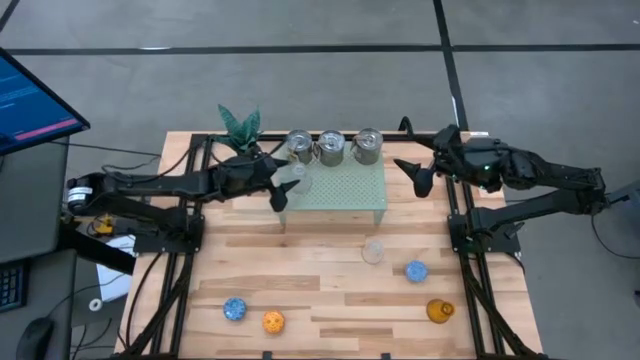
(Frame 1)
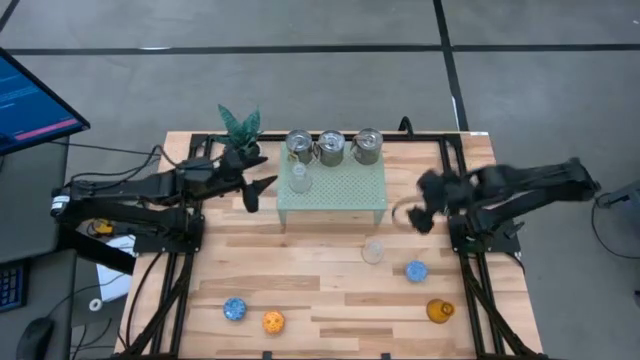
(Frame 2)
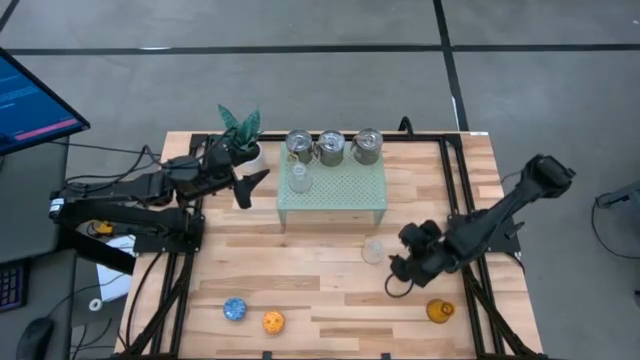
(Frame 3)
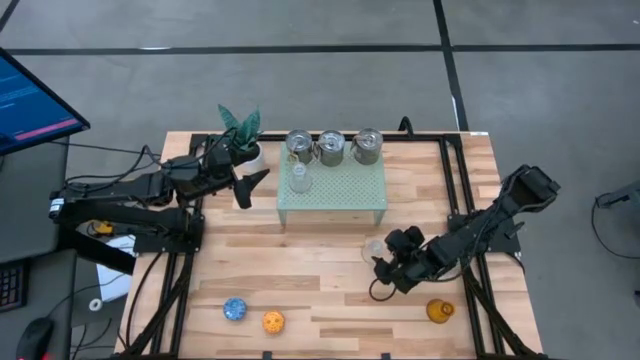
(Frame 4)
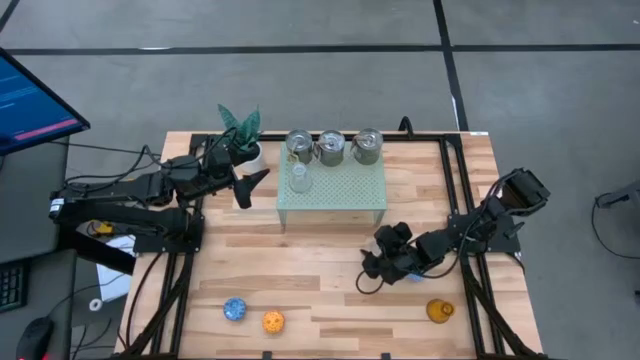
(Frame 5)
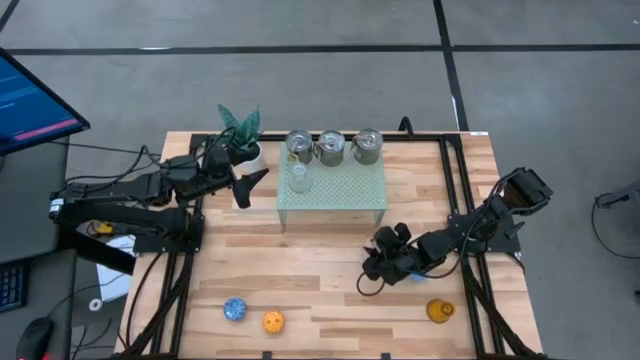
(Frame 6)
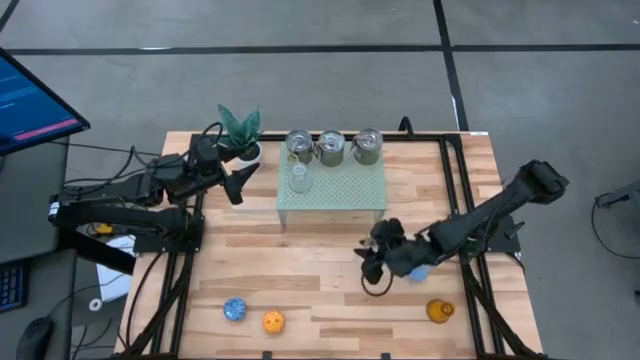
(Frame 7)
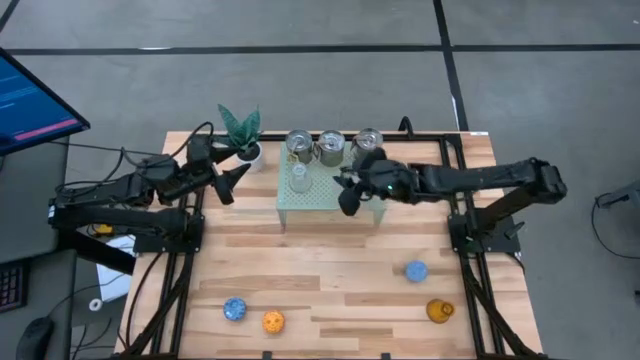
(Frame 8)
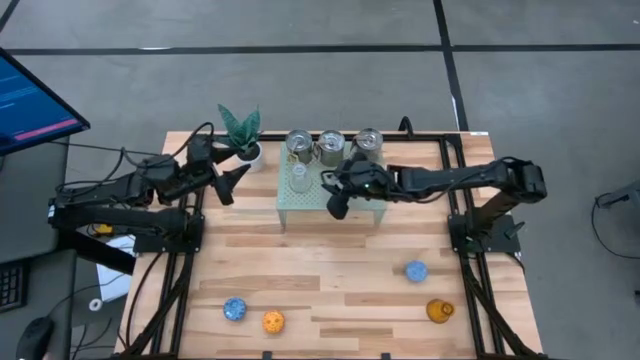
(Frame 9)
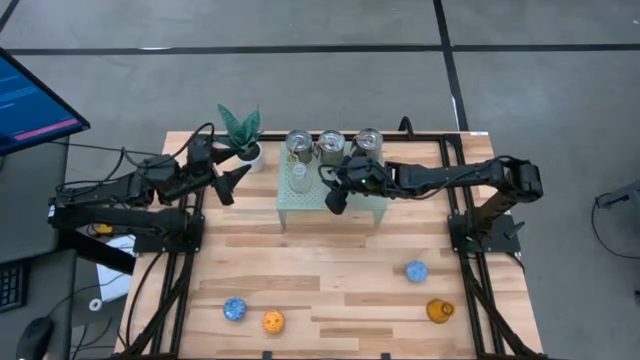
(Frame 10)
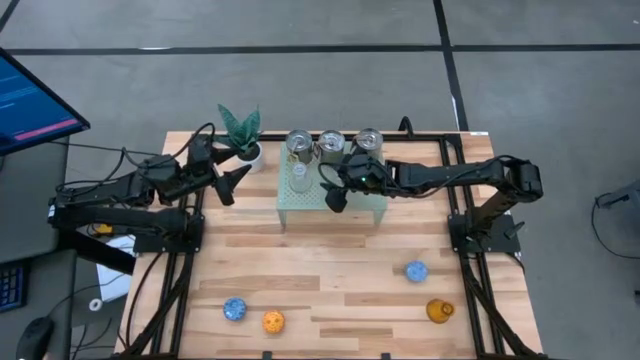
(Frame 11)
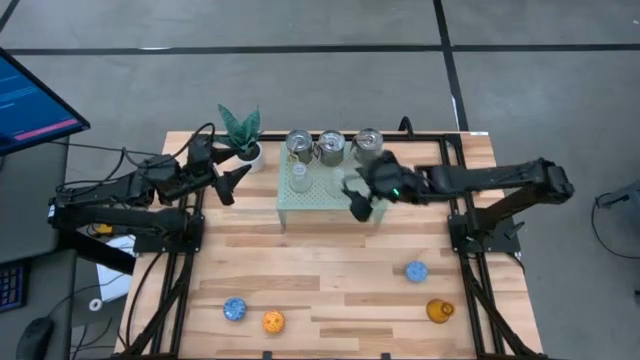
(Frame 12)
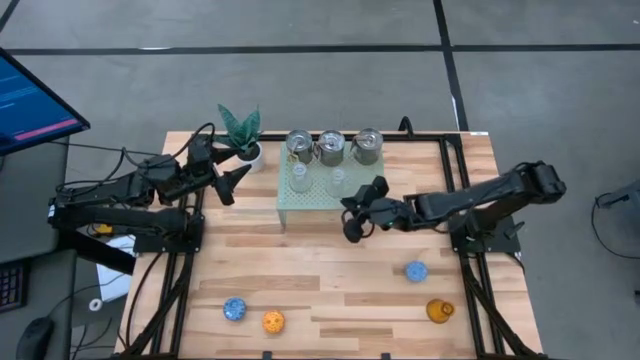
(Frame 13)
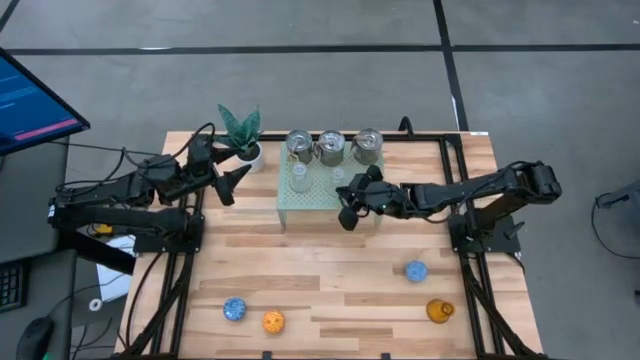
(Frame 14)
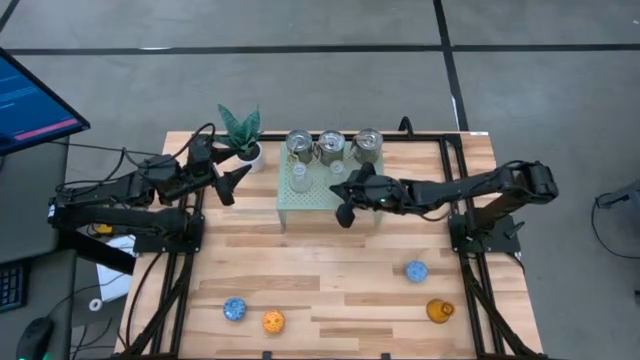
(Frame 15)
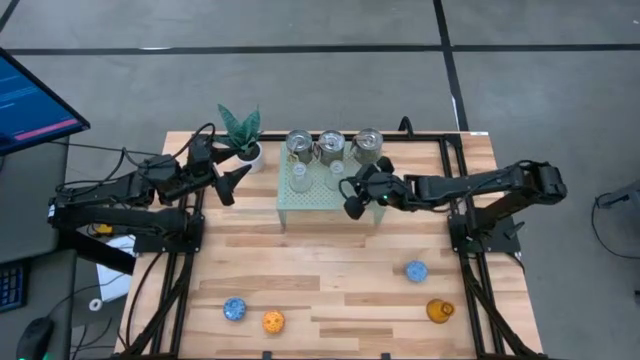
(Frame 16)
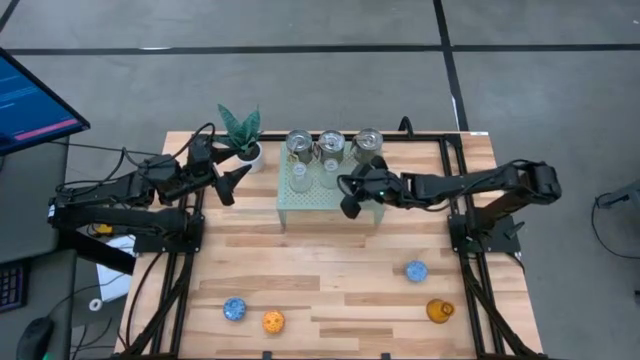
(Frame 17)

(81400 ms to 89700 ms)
Task: Pick & Place candle stick holders
Put the transparent glass candlestick on the shelf

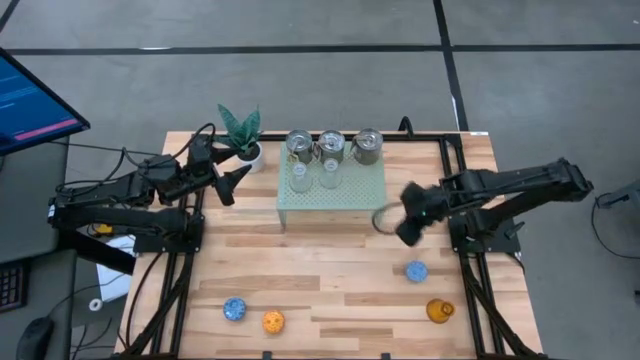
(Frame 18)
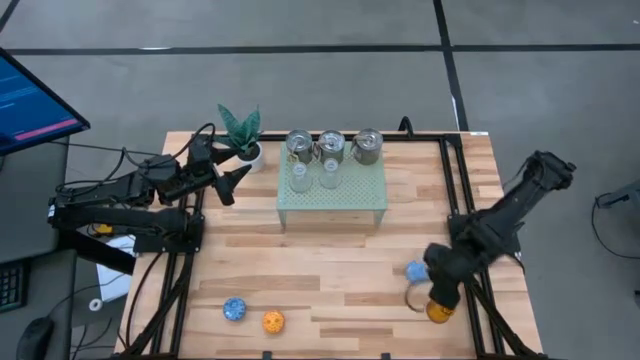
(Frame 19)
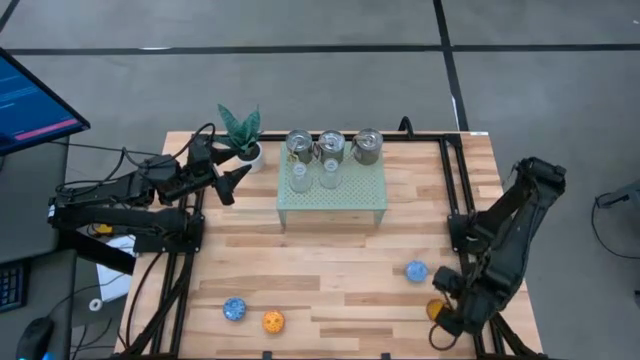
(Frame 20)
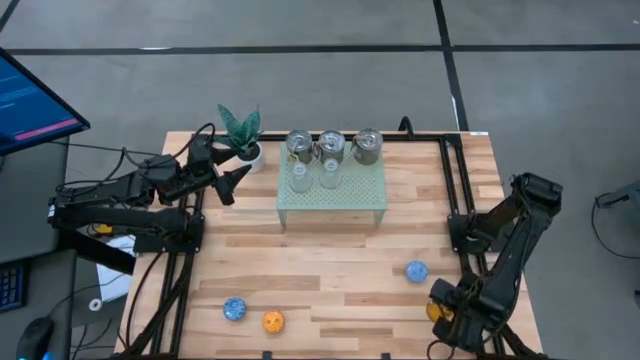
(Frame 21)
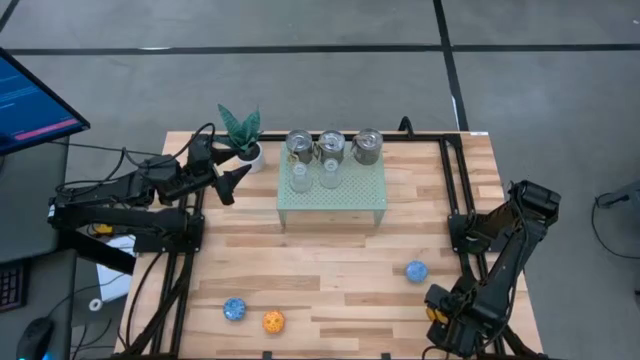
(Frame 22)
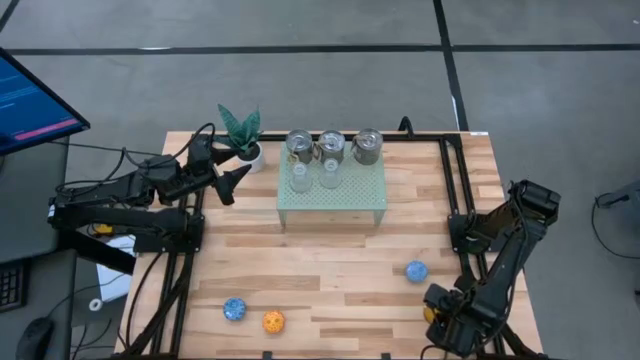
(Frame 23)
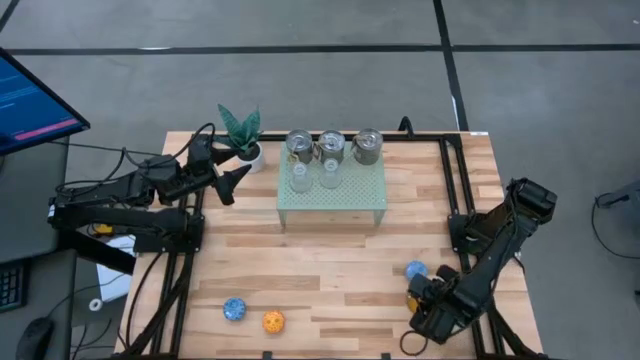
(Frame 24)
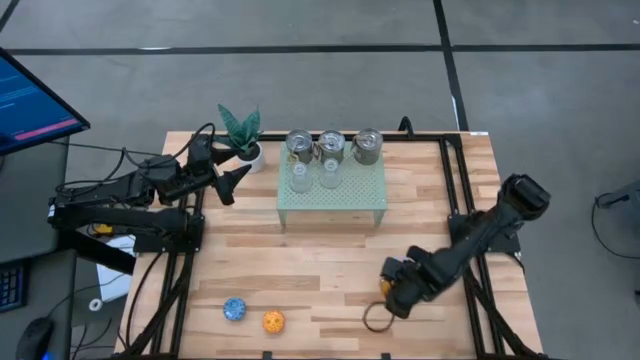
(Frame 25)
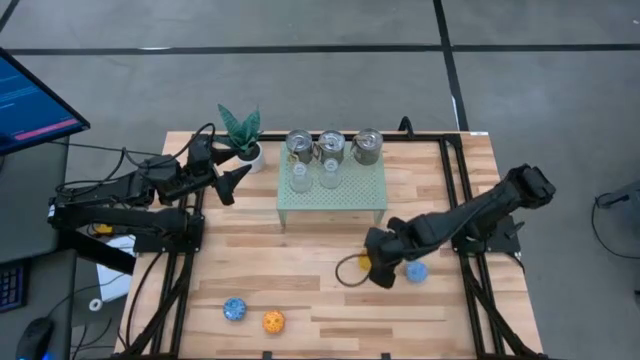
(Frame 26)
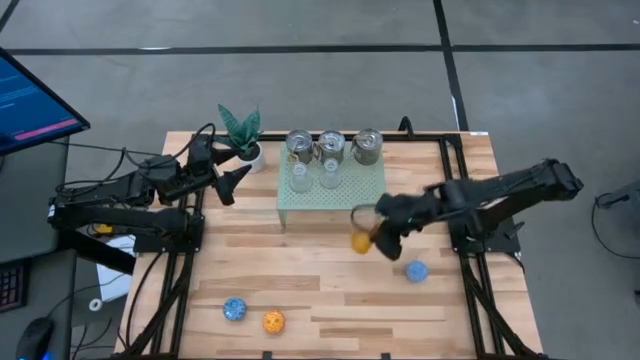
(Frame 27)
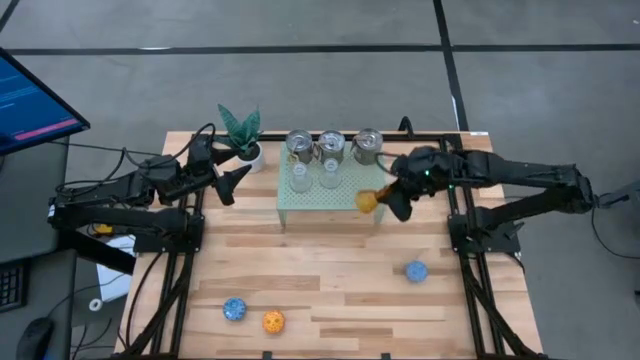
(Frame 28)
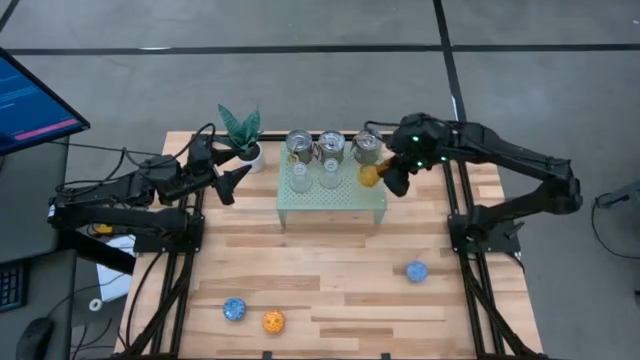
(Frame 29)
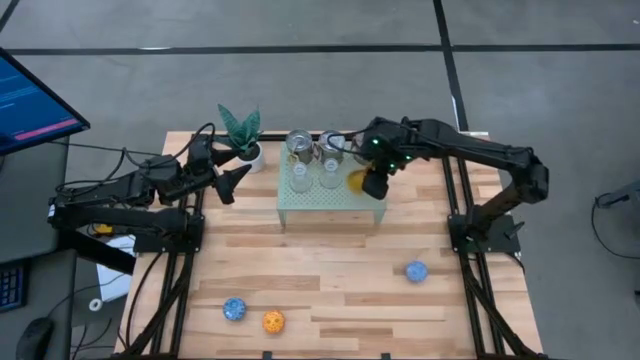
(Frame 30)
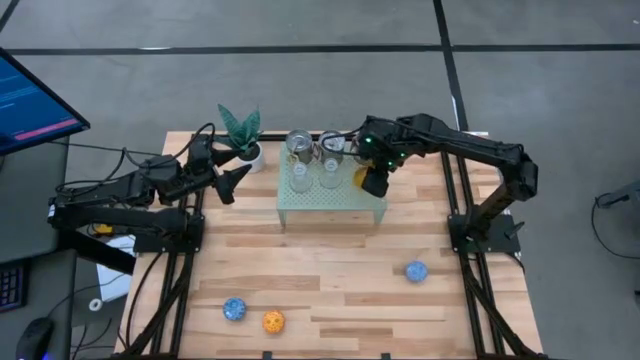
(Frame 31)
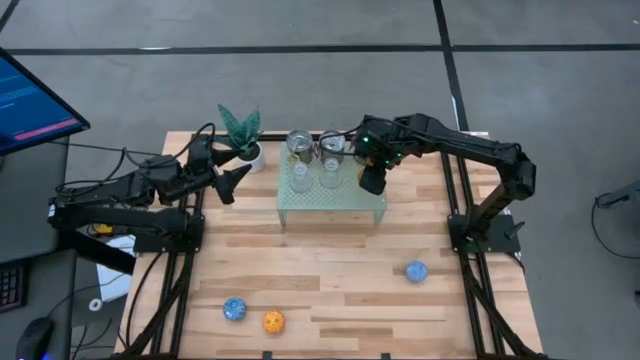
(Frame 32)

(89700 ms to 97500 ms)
Put the brown glass candlestick on the shelf

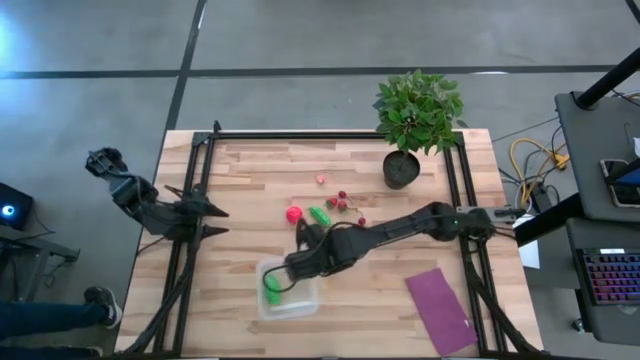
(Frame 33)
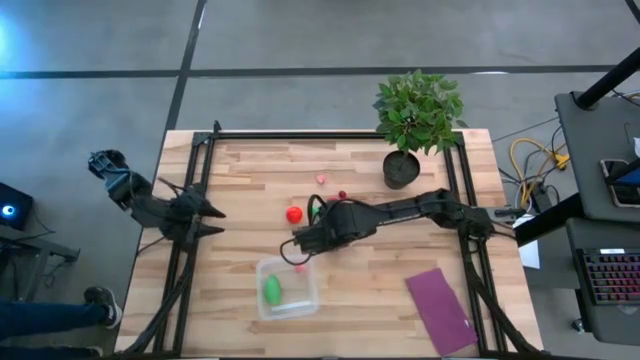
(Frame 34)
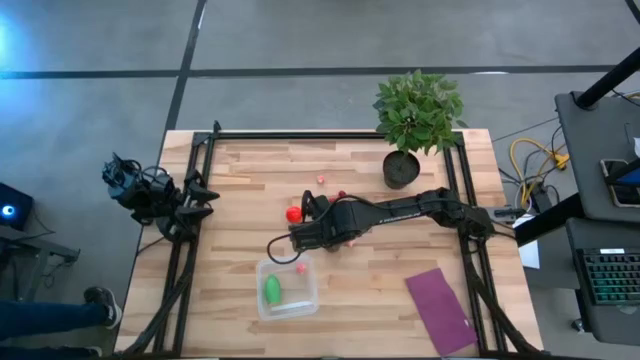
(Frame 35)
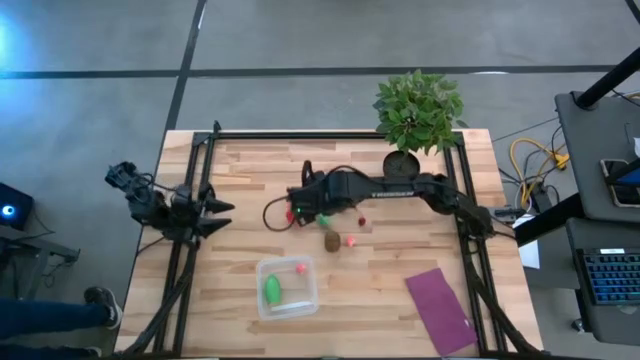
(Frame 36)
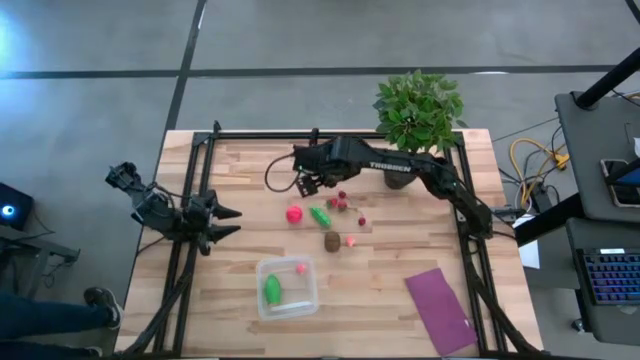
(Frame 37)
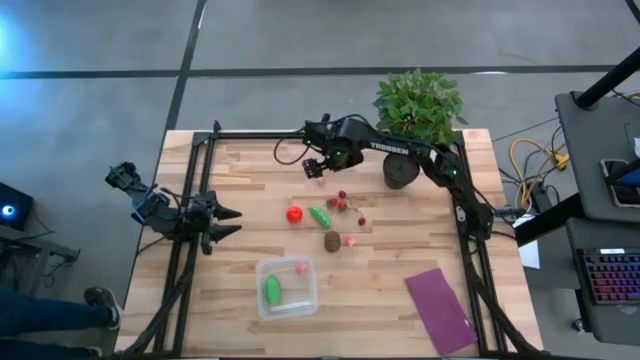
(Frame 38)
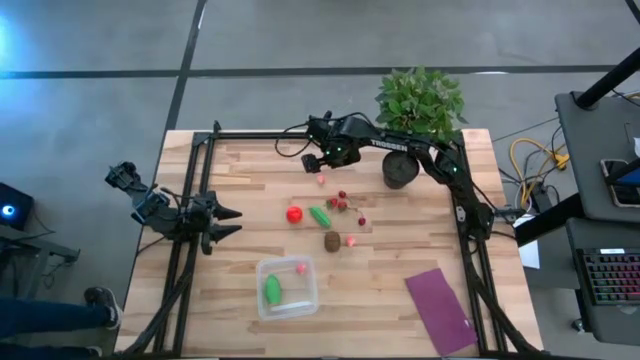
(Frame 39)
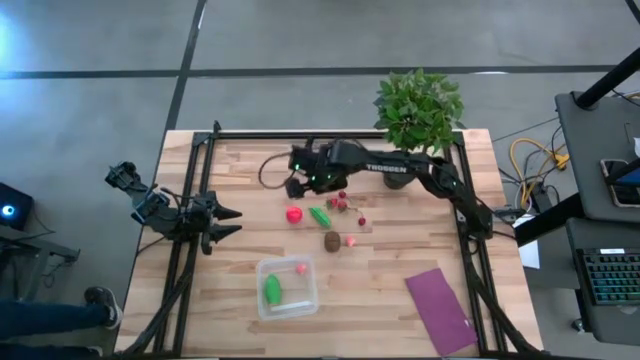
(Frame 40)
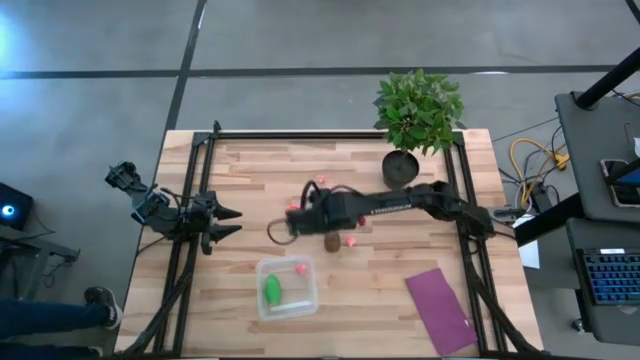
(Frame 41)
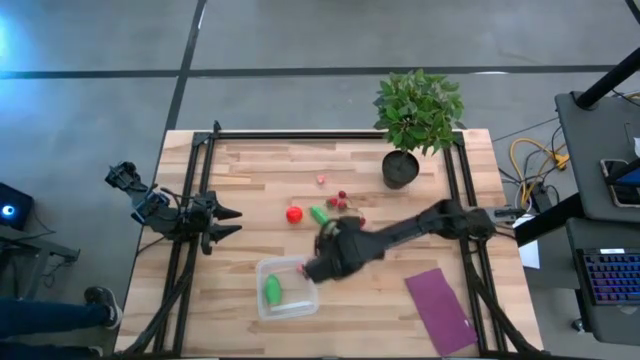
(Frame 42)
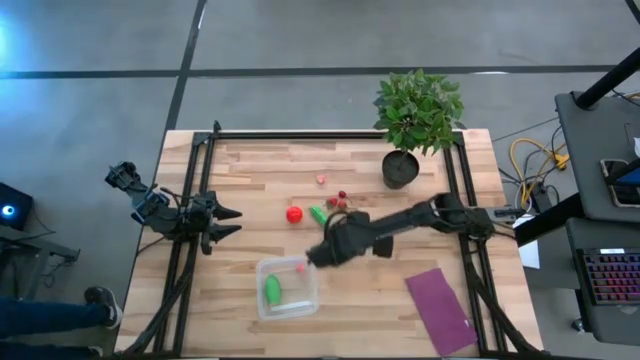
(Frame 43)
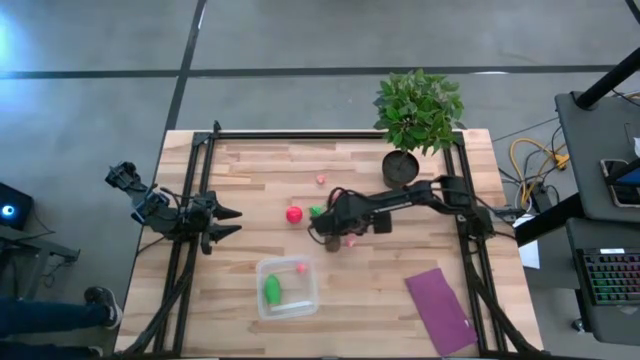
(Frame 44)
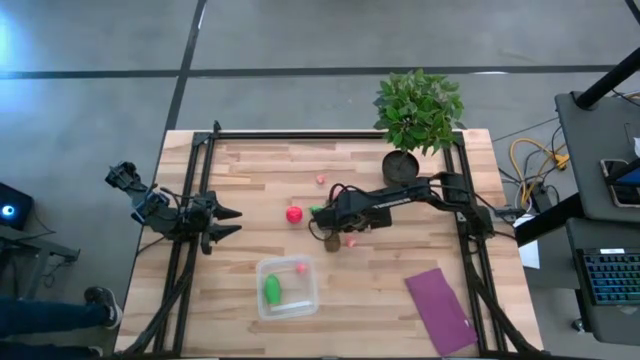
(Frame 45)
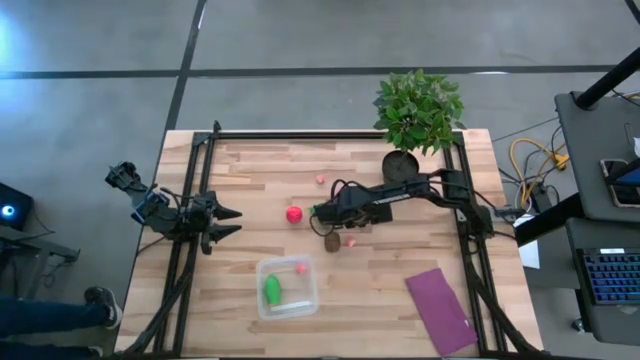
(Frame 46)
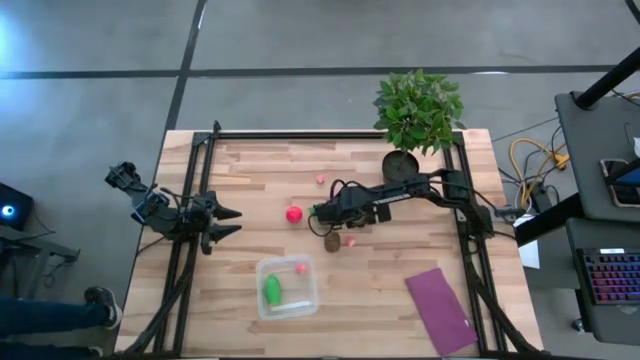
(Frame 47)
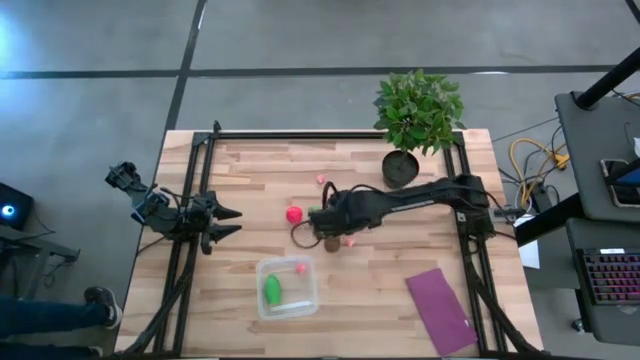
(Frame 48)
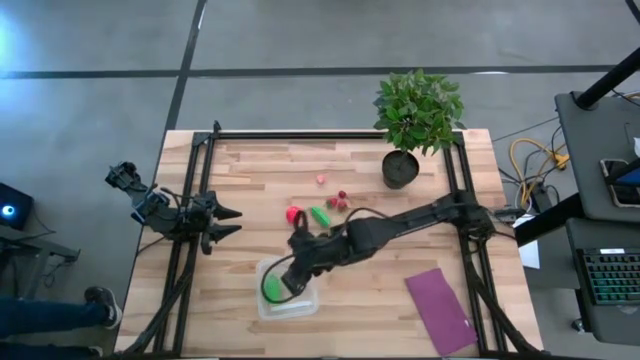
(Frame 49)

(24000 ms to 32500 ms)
Task: Pick and placing Produce into tupperware
Put the bottom cherry into the transparent bin
